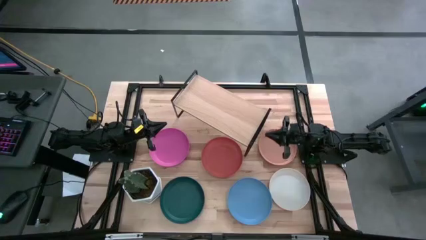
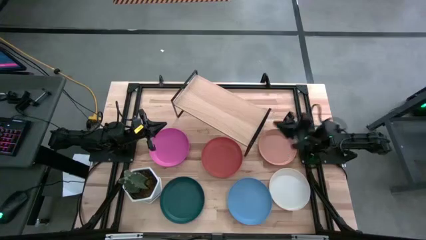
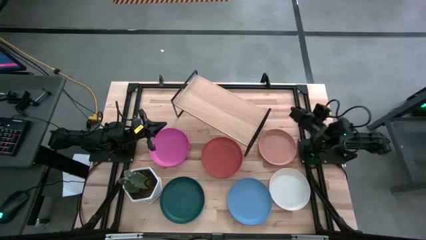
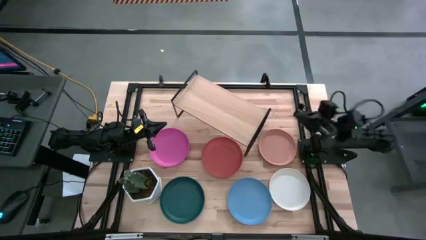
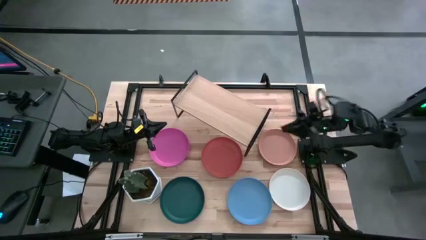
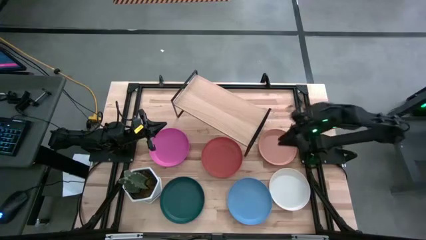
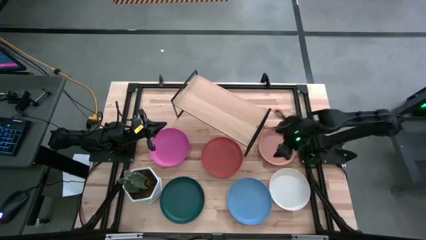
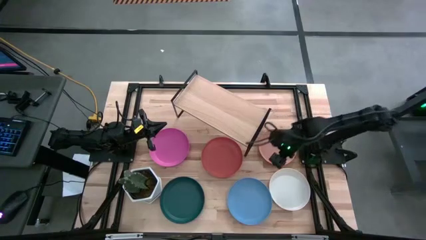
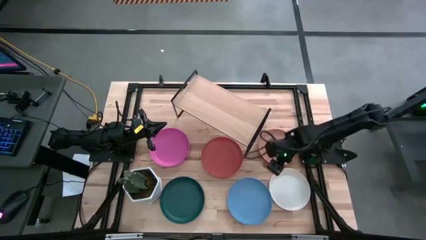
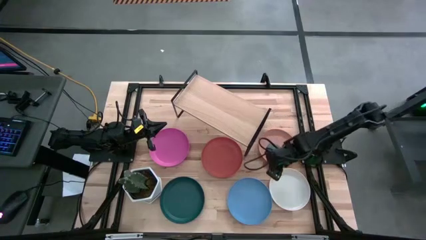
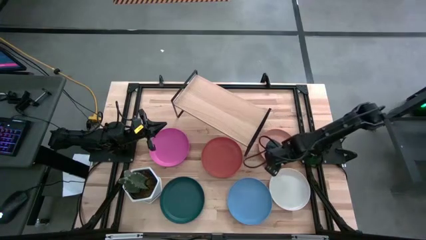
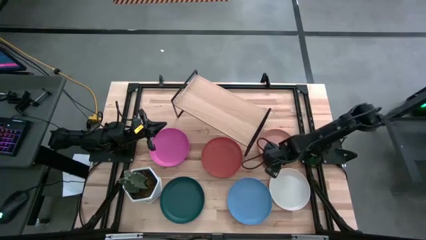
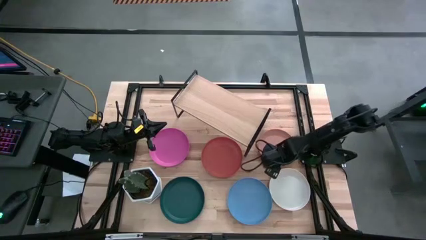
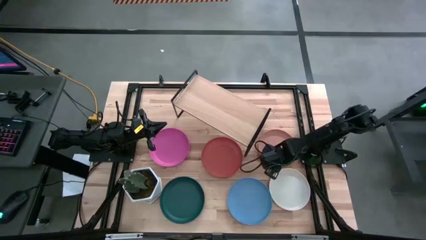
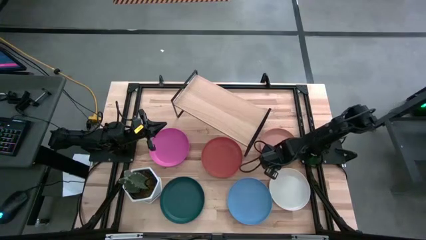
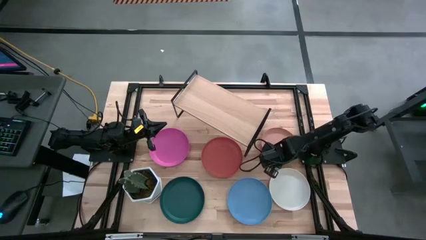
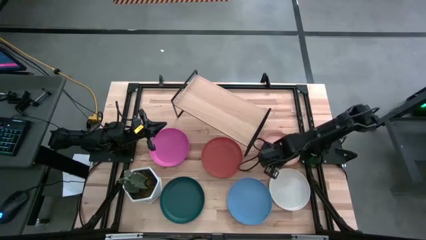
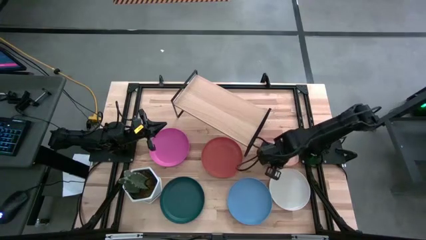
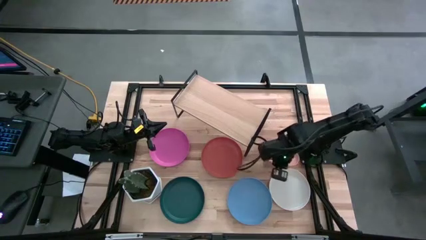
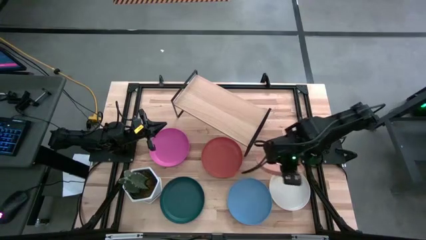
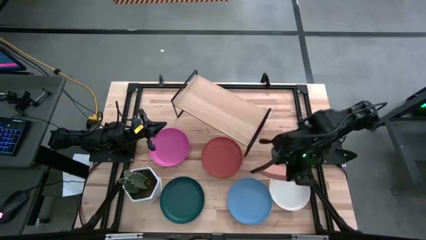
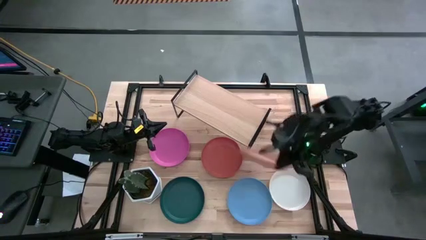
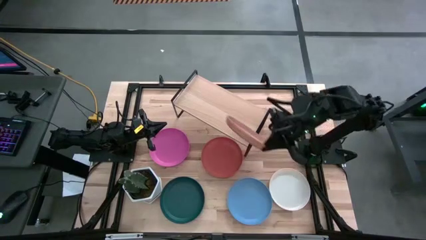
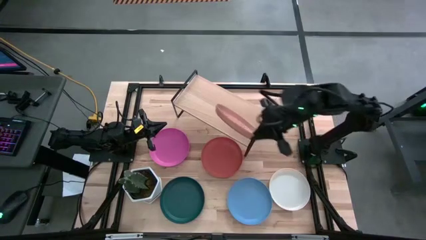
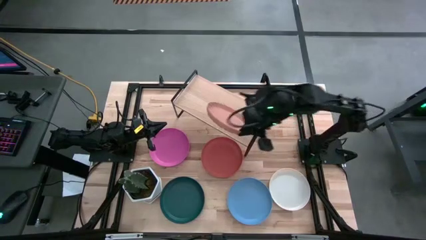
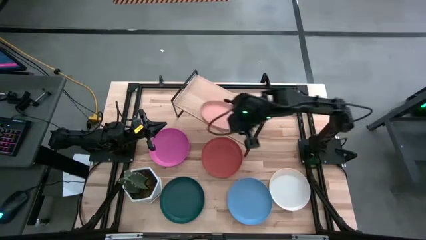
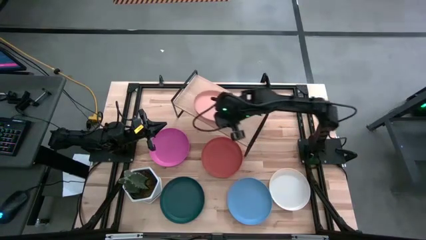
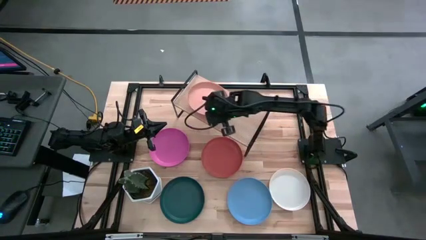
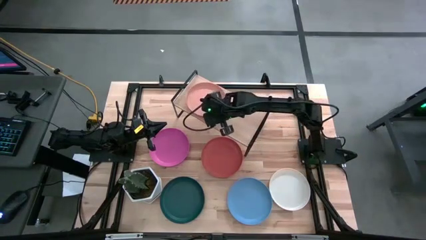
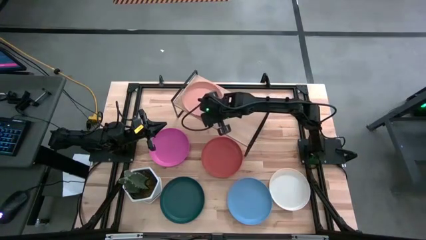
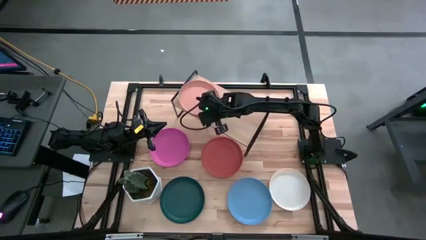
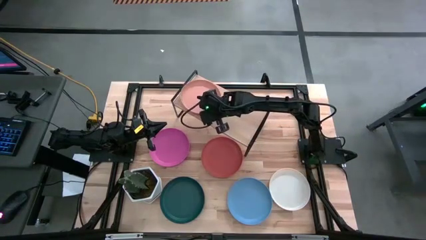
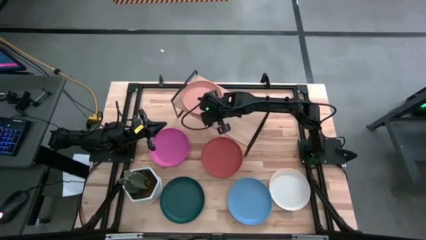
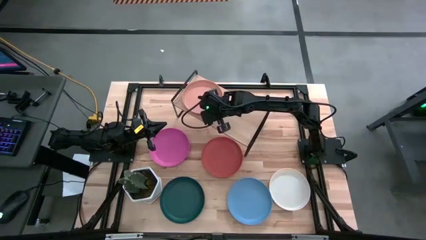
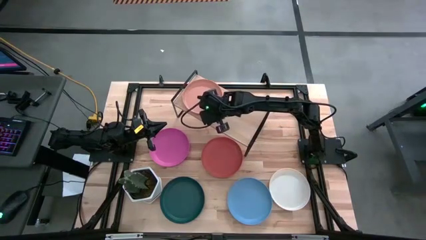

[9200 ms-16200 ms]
Task: Place and stack plates onto a shelf
Put the orange plate on the shelf

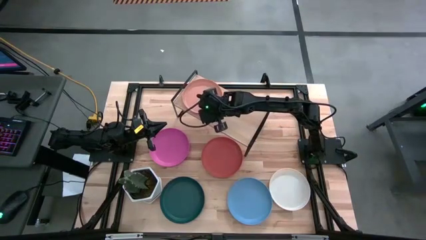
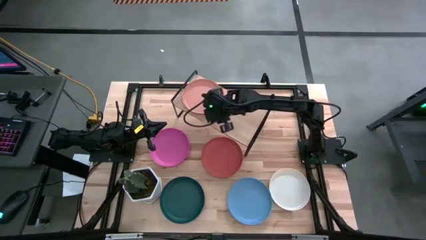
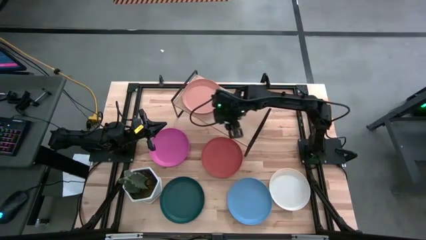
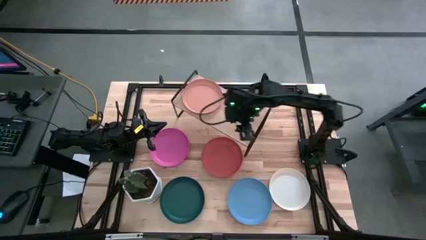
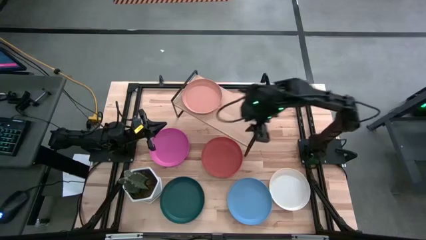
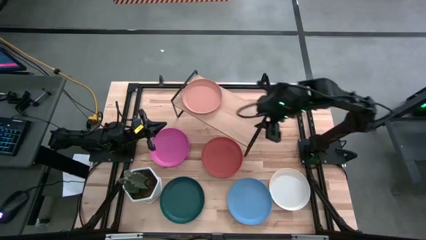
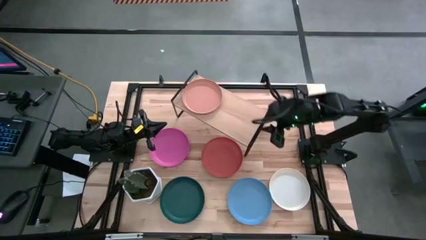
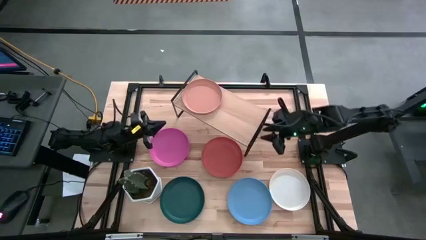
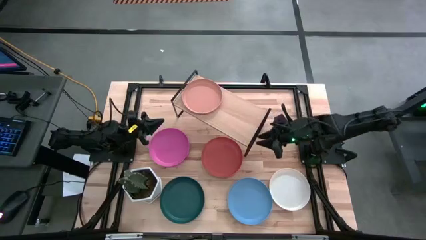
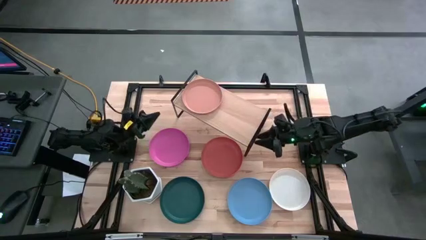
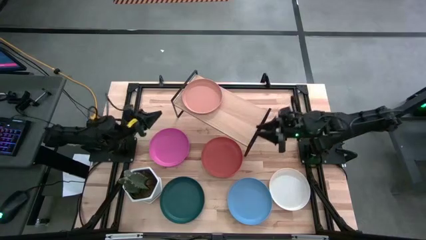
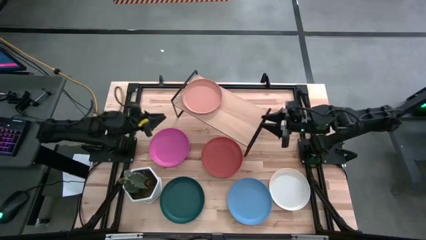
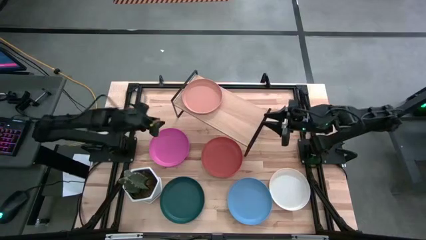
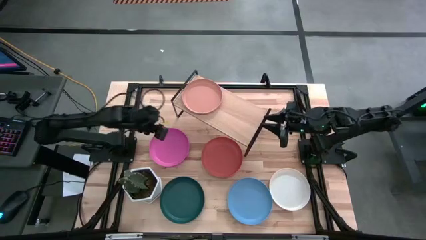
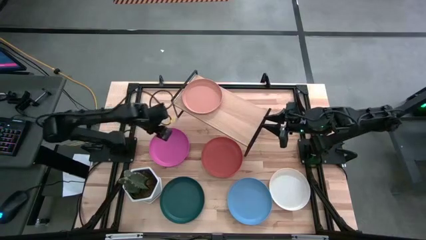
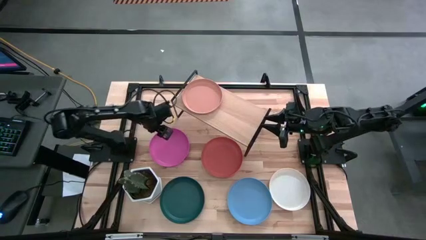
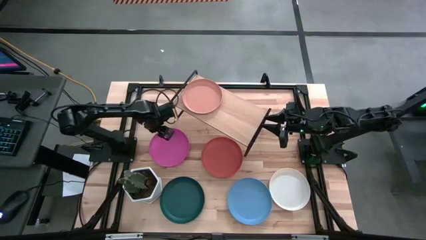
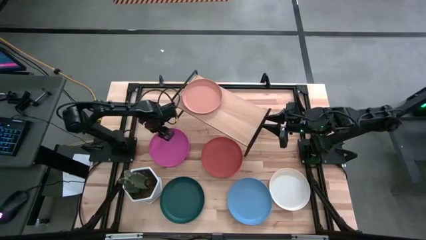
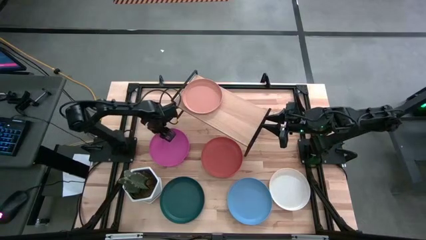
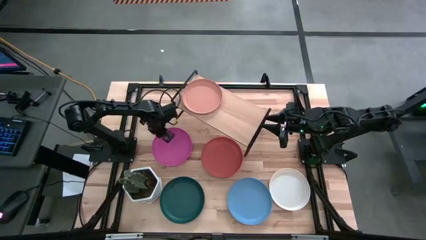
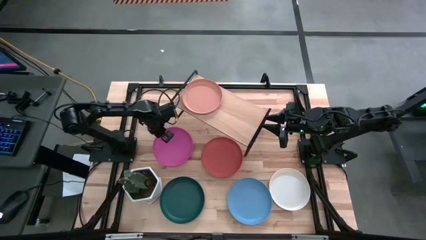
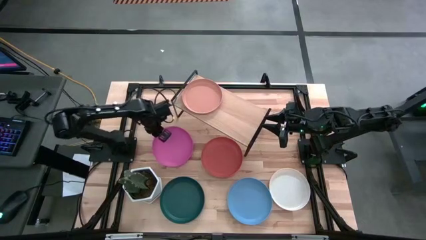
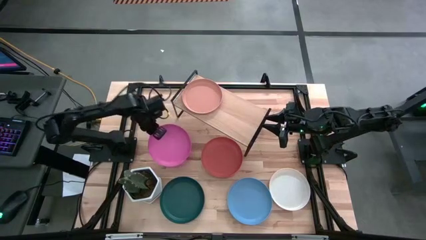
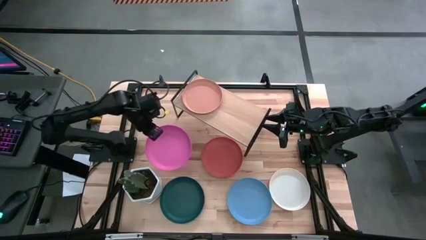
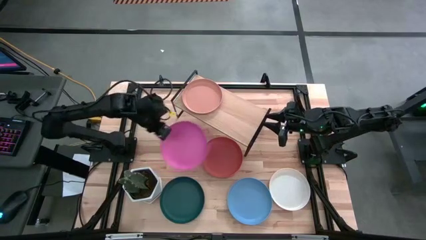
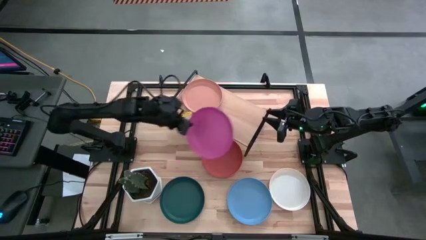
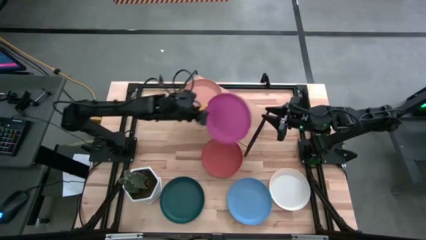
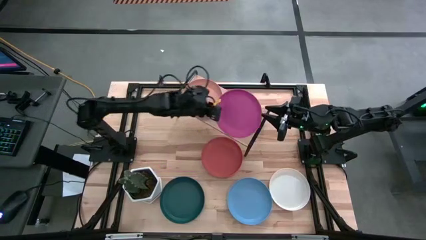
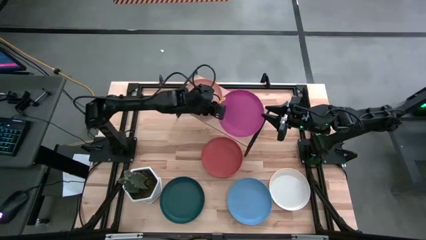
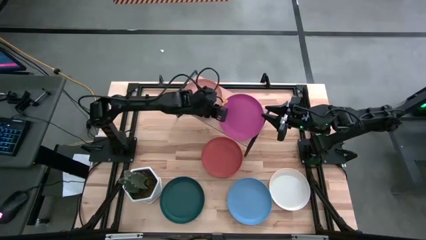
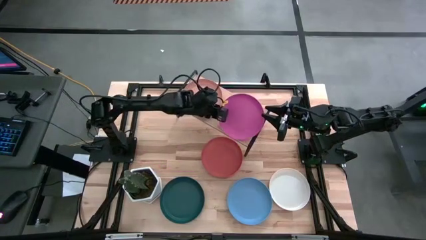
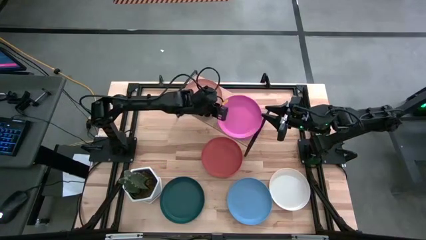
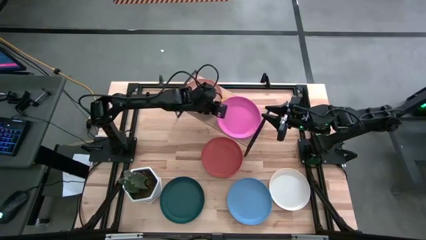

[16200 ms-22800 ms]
Put the pink plate on the shelf

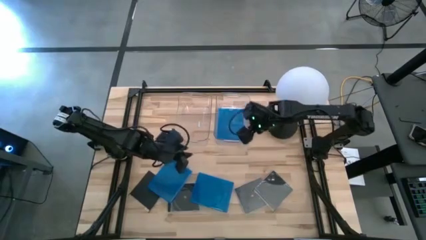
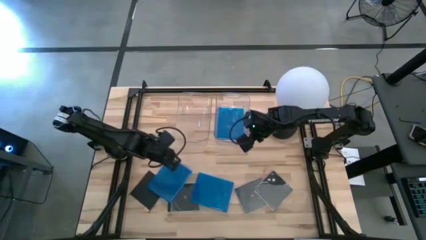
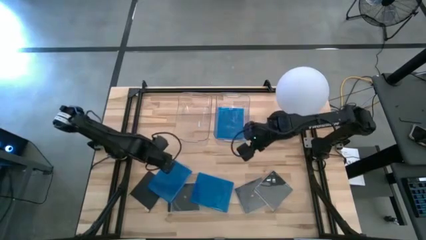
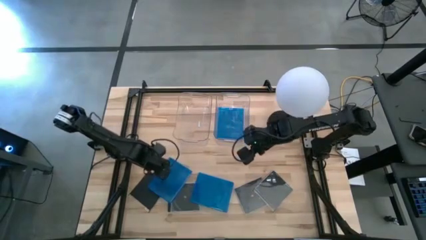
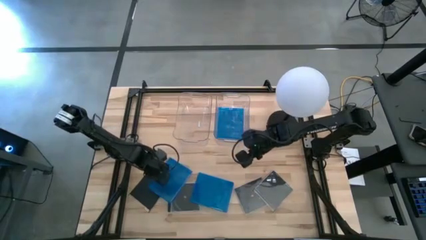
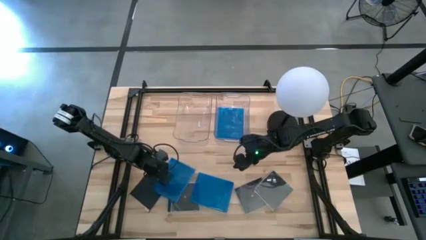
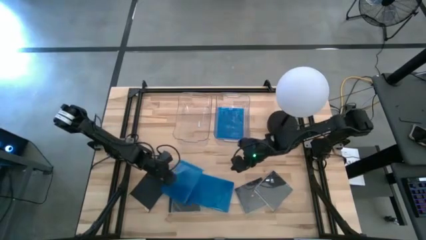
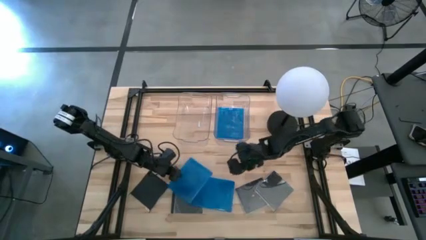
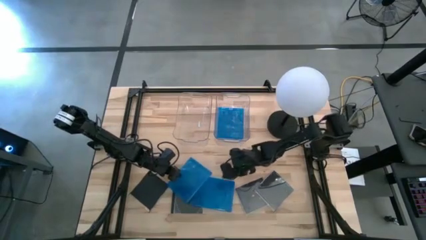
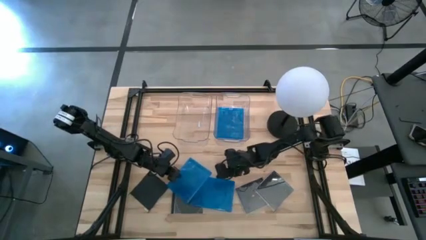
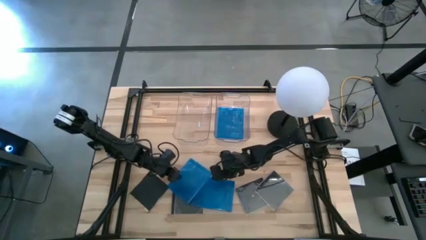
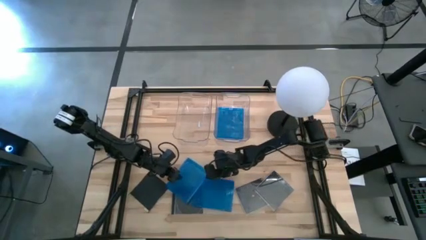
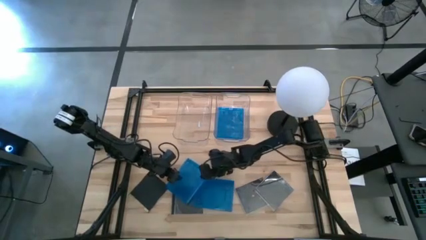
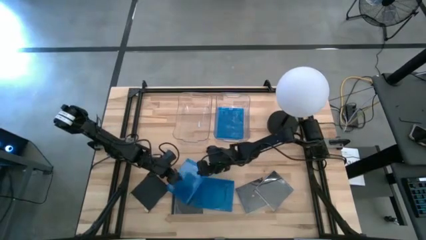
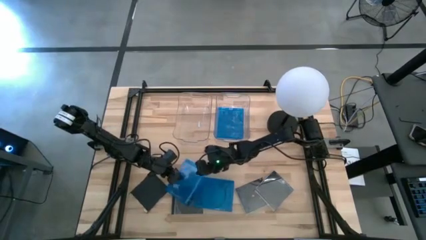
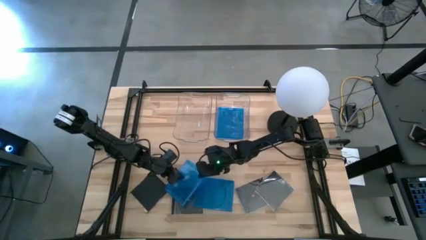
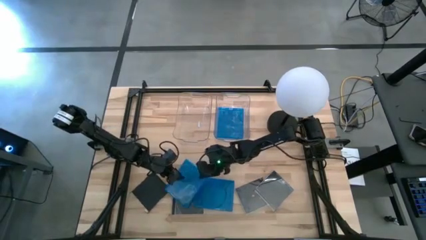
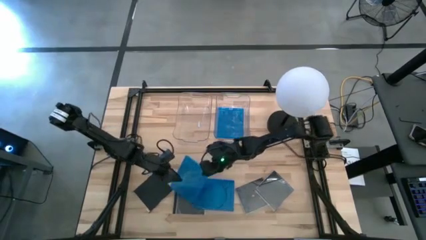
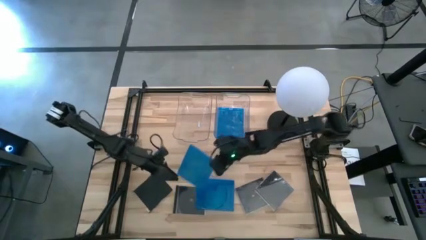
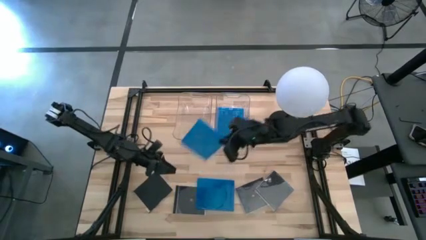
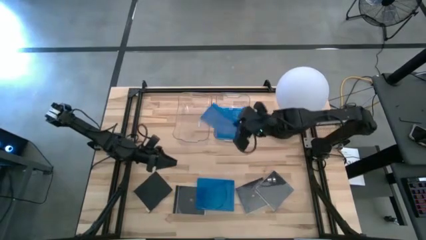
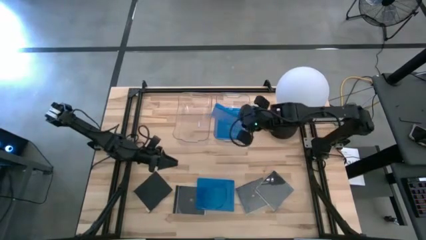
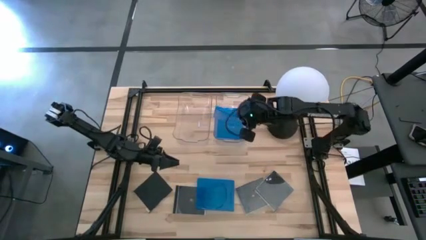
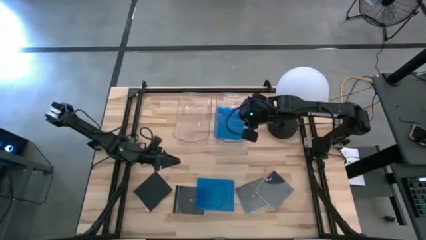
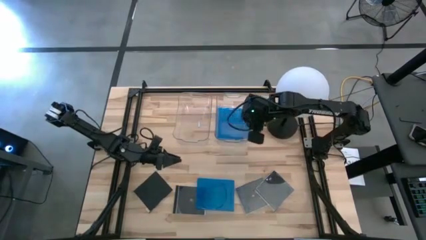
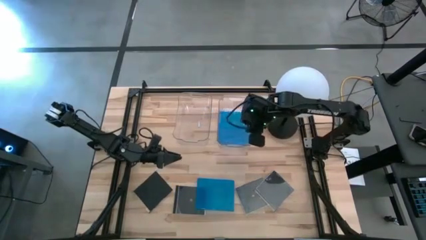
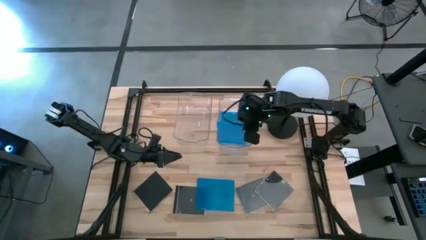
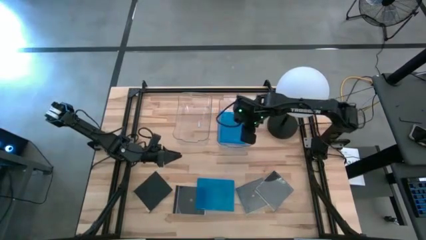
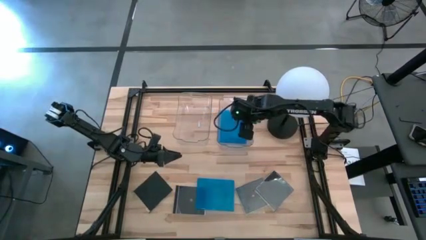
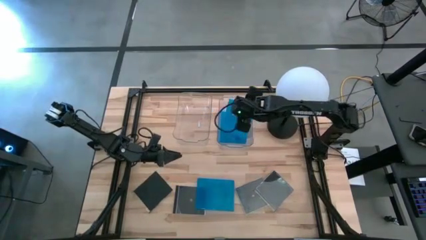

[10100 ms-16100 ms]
Task: Pick & place jewel cases by type
Put the left blue cd case into the right transparent bin
